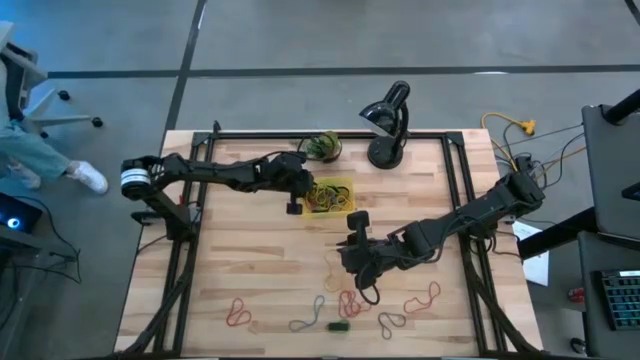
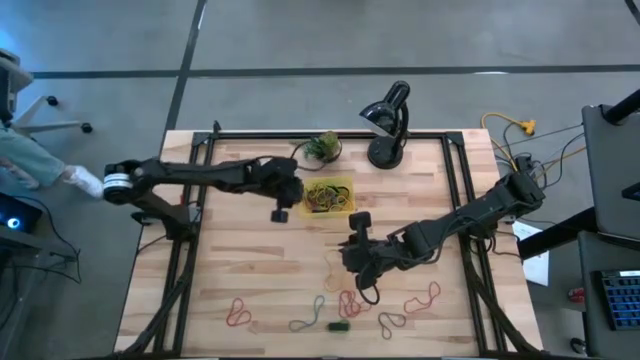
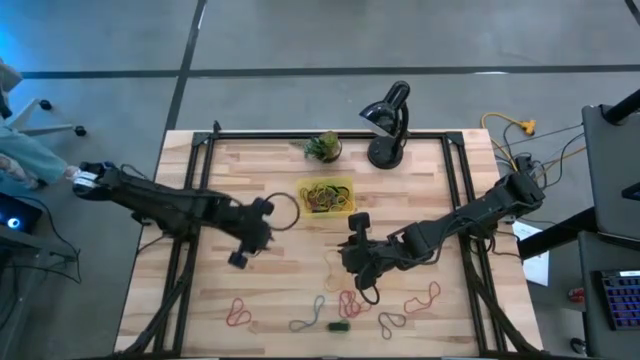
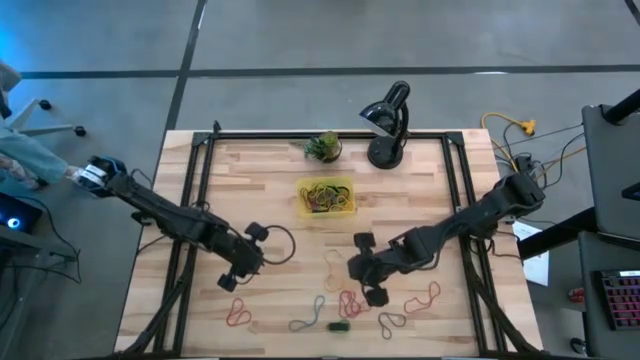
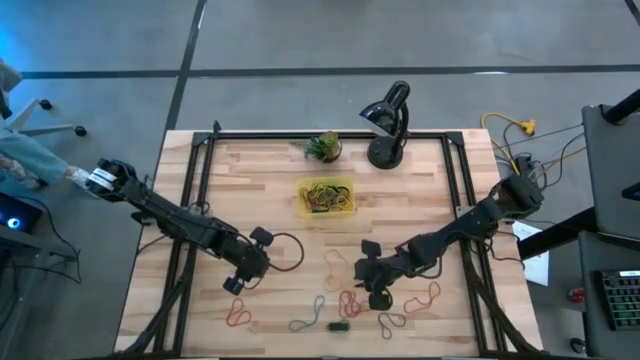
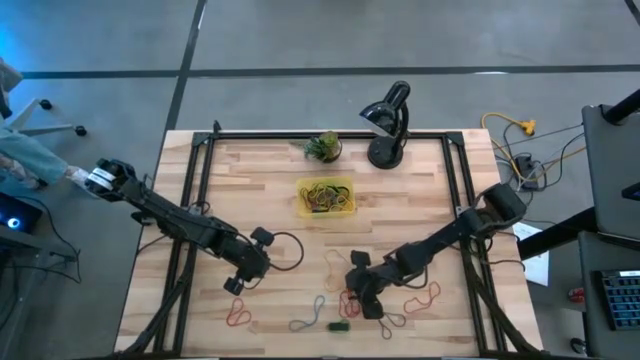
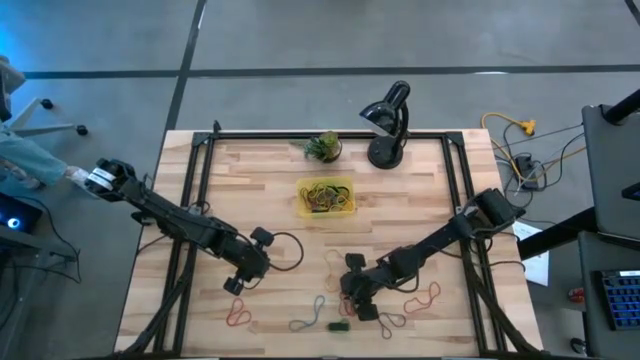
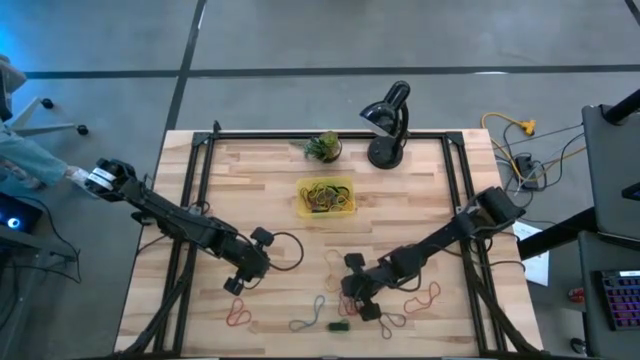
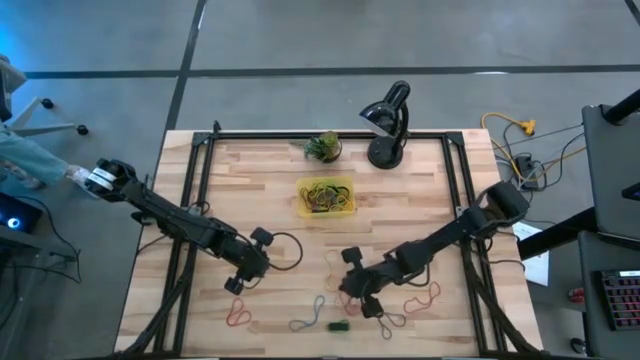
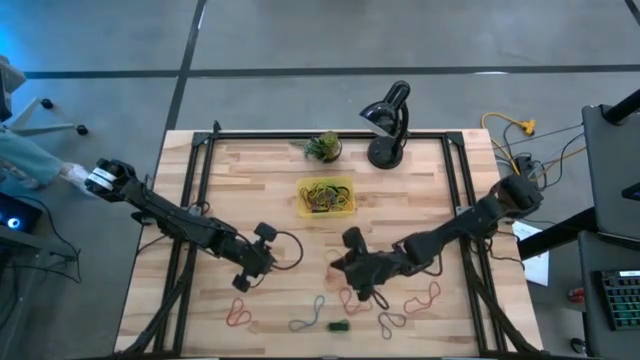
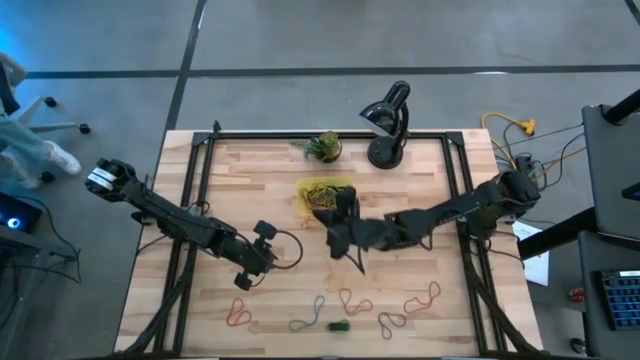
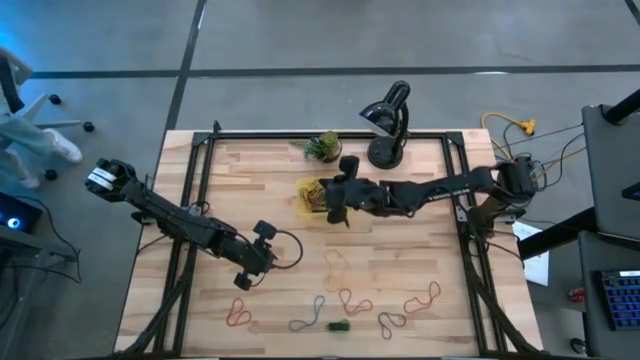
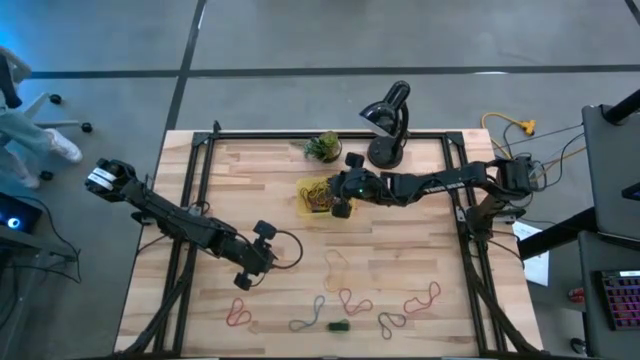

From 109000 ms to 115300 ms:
Task: Pick and place rubber bands into bin
Put the red rubber band in the yellow bin

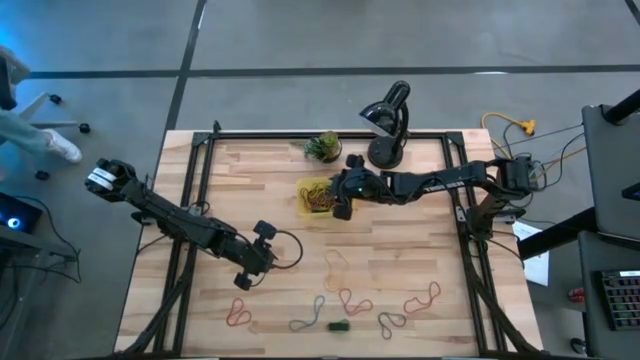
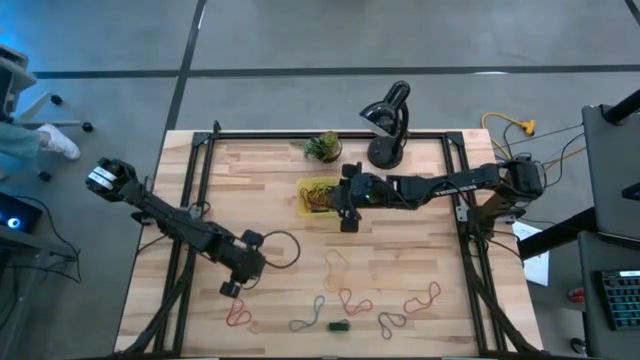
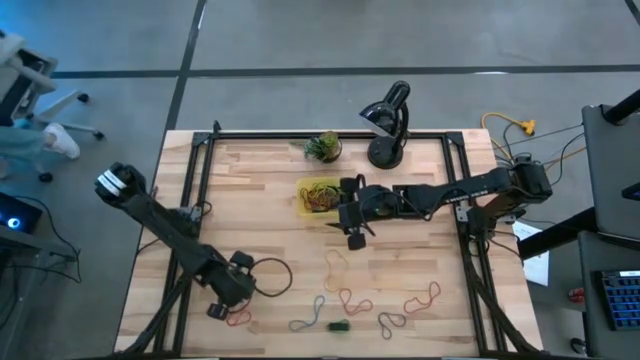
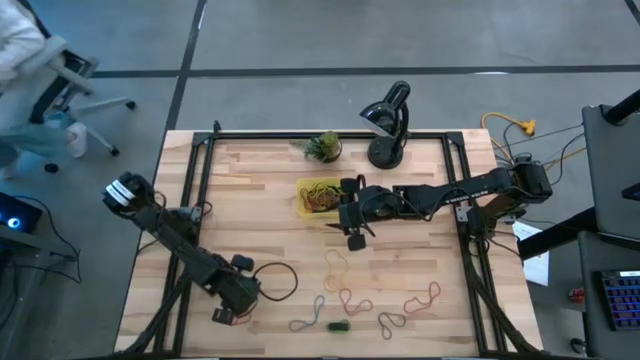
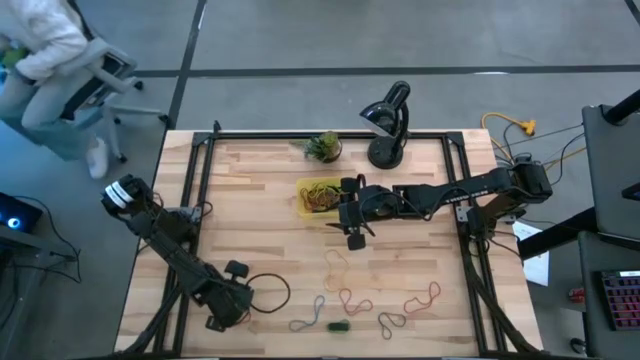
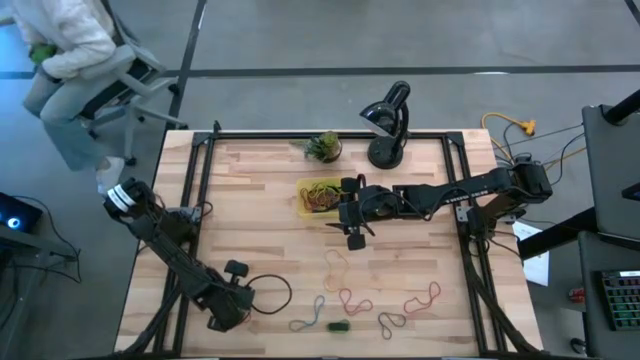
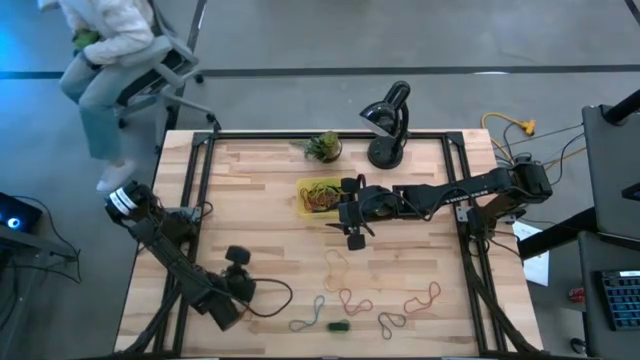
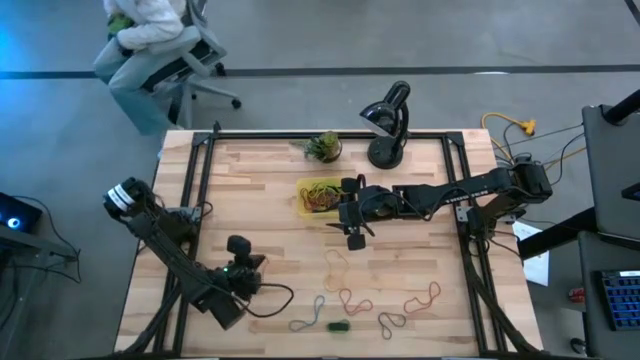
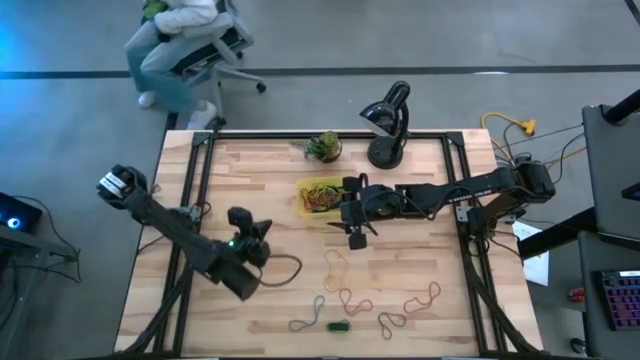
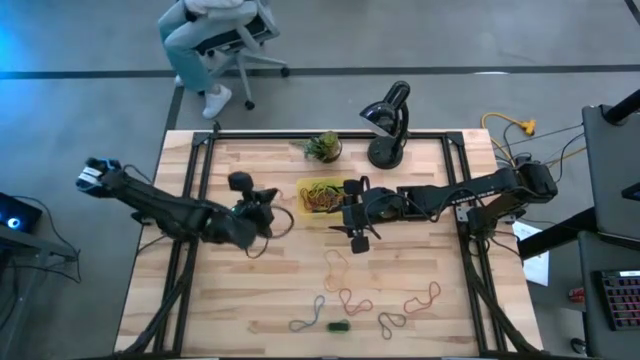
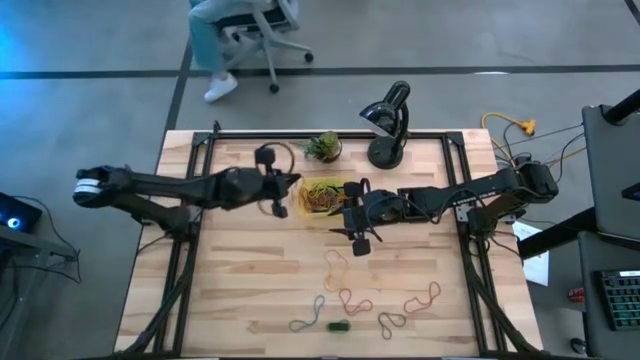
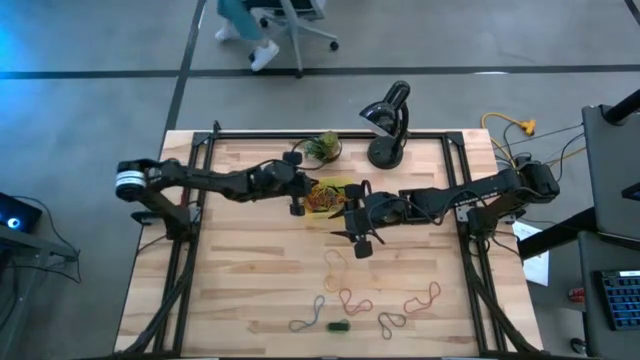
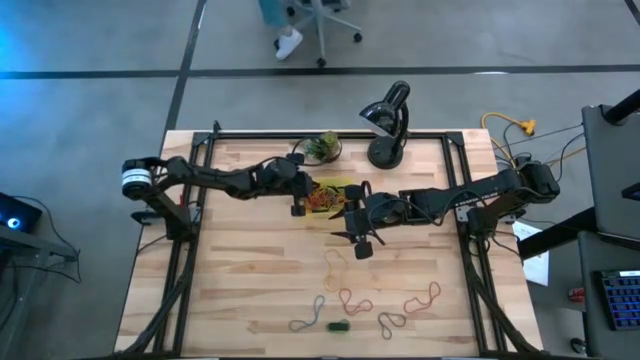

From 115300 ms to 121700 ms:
Put the red rubber band in the yellow bin

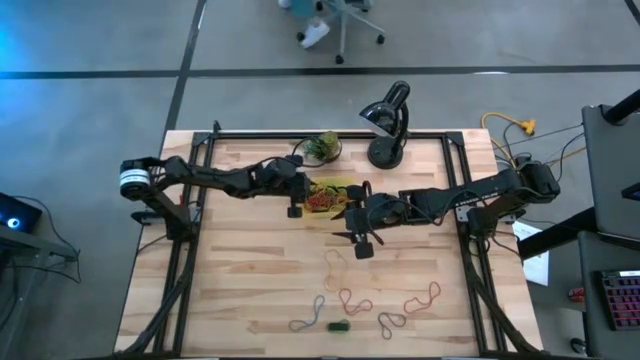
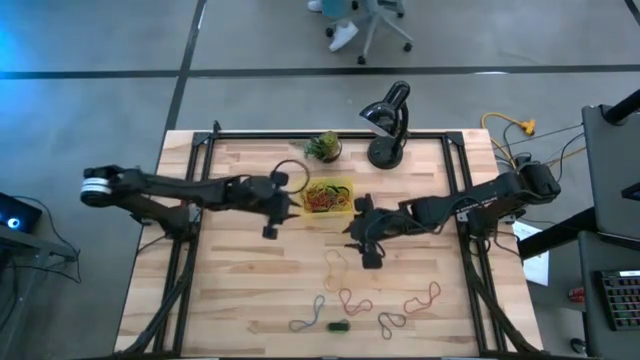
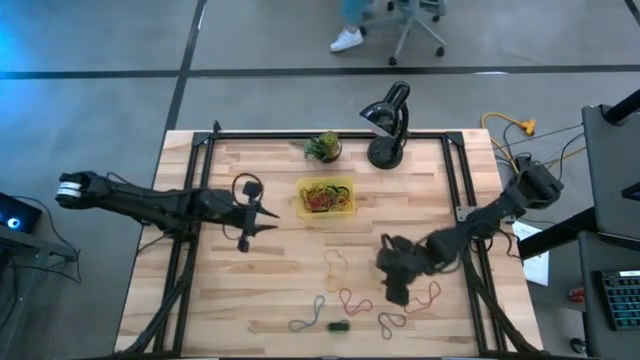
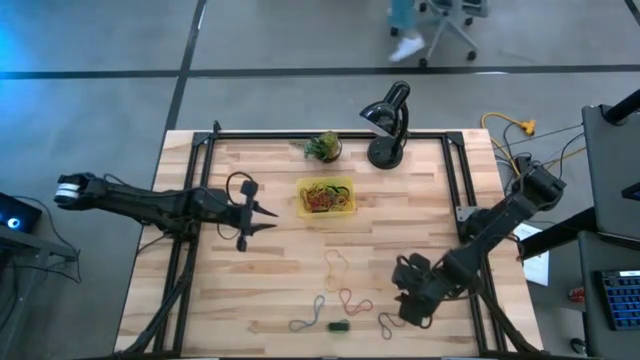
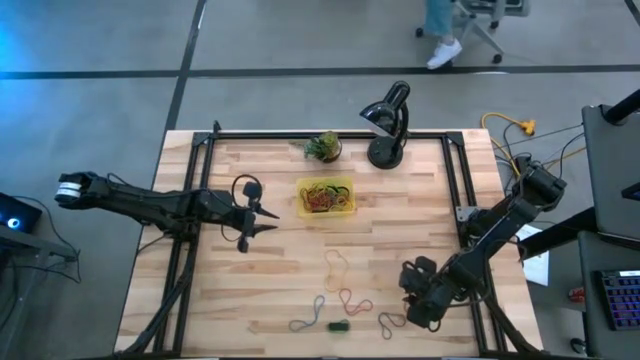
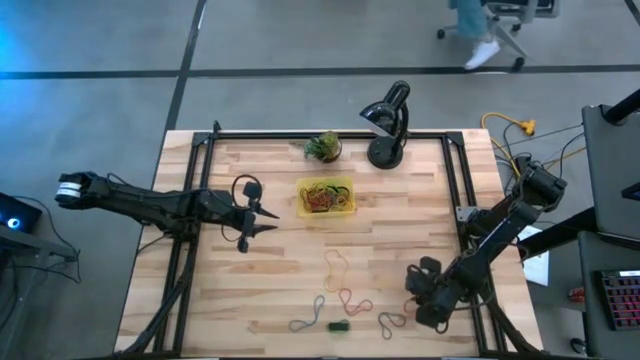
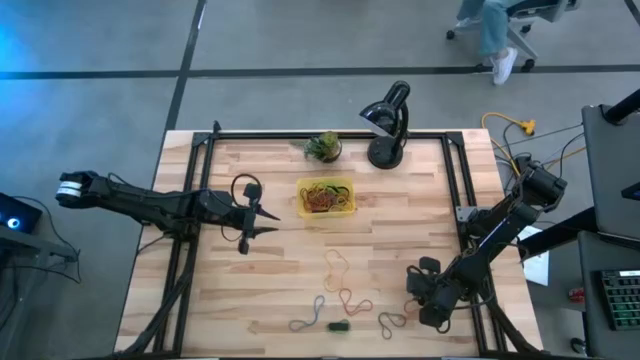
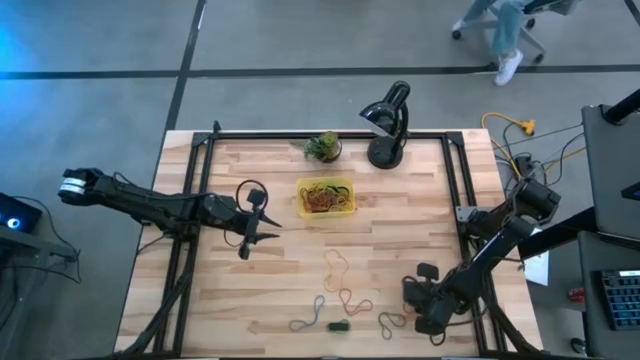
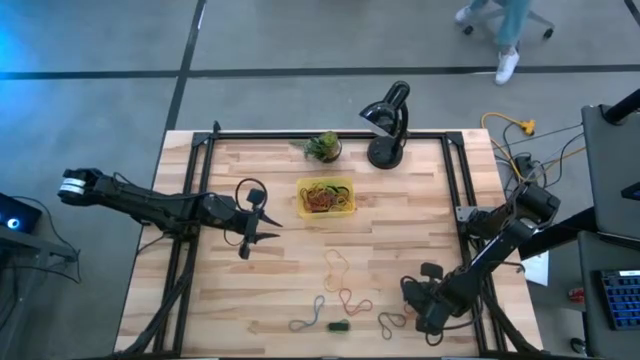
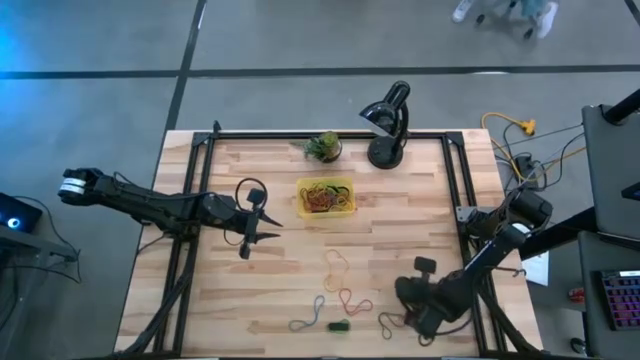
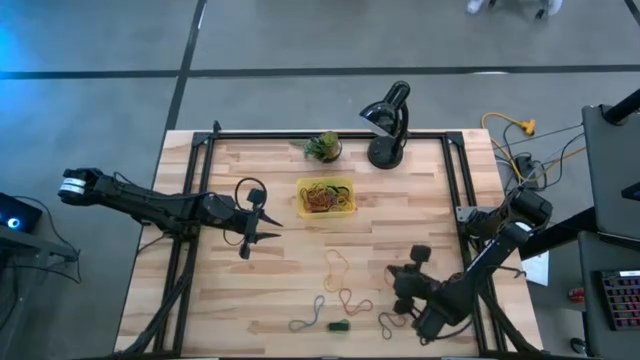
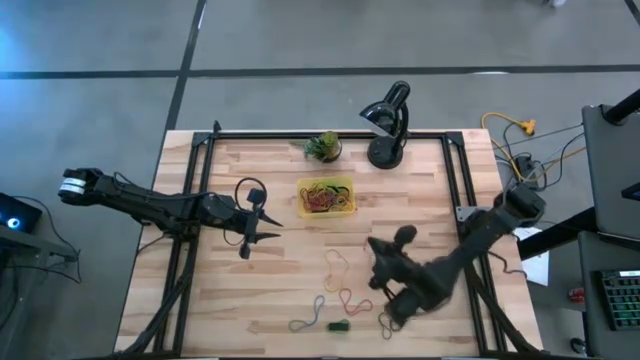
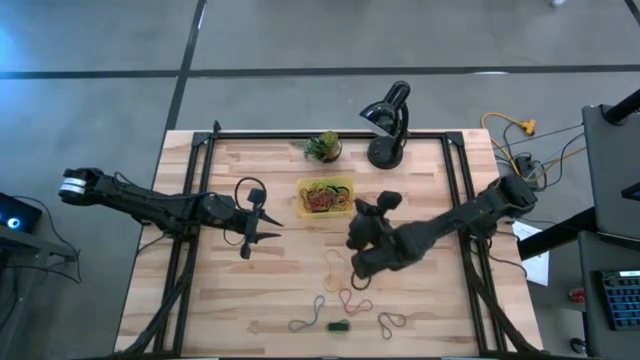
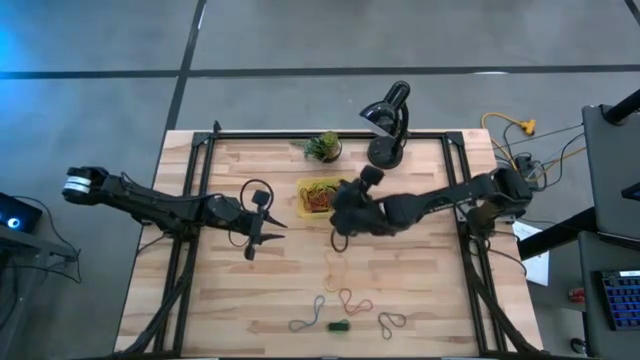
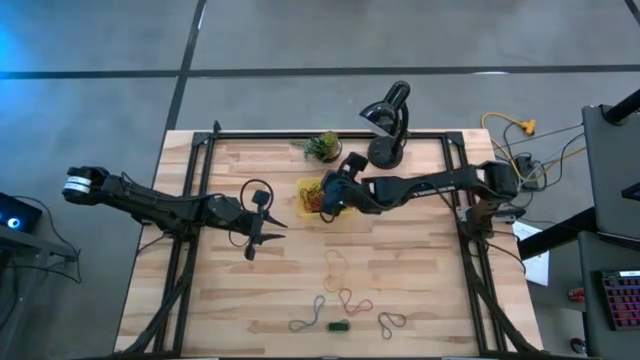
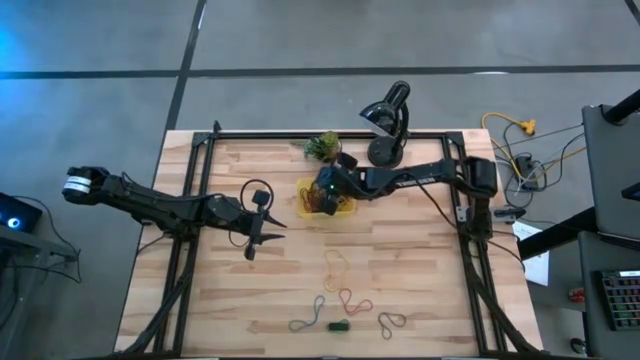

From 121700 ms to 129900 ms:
Put the red rubber band in the yellow bin
